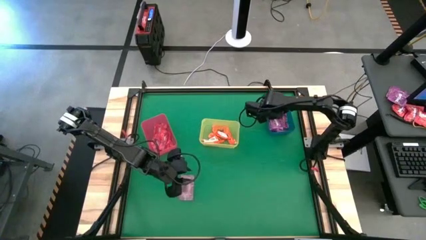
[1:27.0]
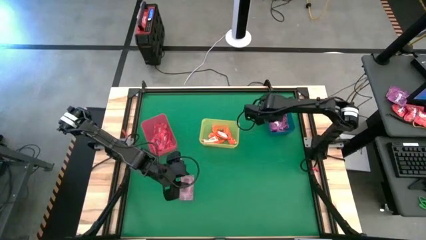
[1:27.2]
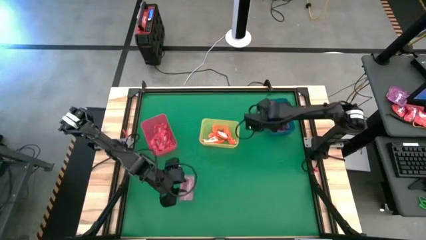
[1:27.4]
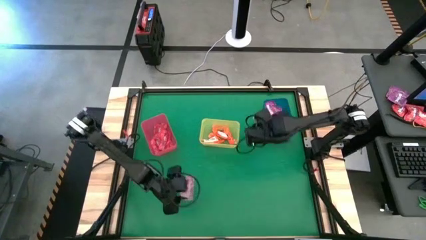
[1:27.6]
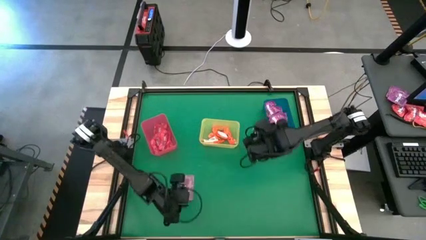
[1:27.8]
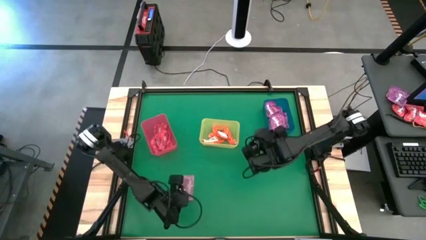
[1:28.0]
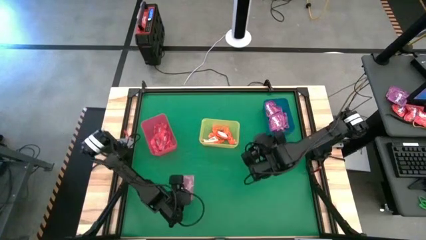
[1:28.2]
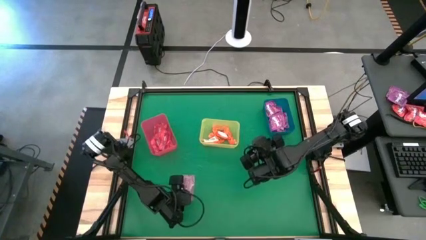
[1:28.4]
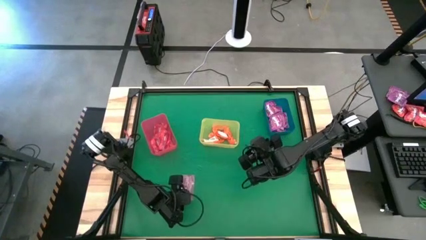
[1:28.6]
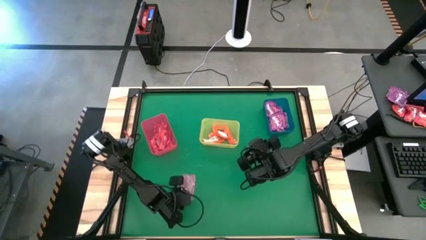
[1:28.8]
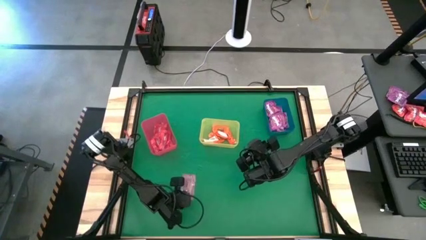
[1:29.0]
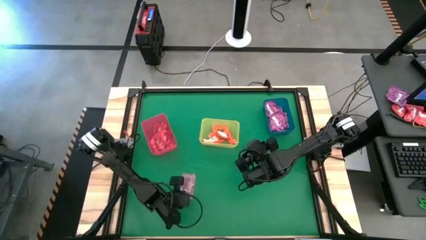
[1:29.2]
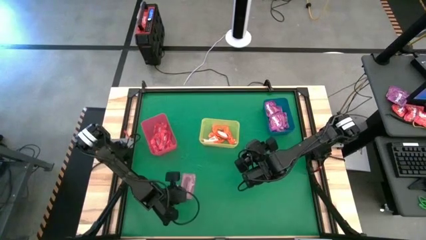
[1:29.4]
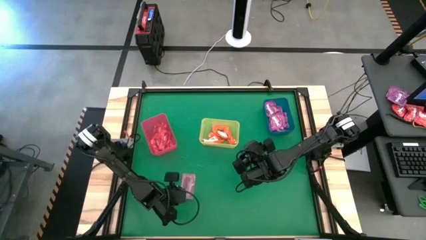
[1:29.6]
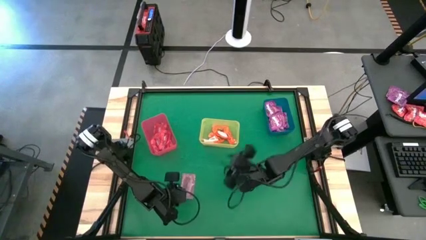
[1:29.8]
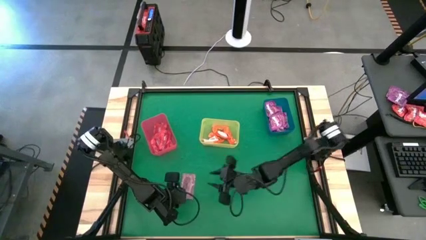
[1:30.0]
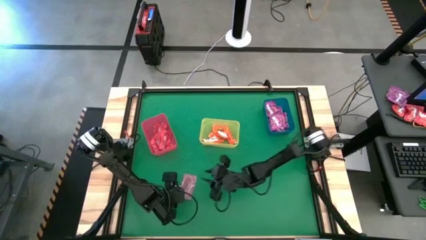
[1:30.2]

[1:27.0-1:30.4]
Task: Sort candy by brand, put in halloween buckets
Put the red candy into the red bin

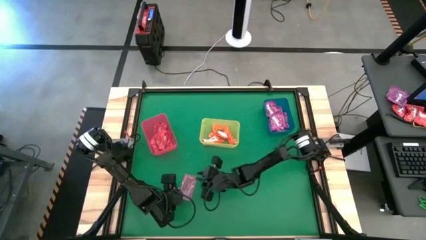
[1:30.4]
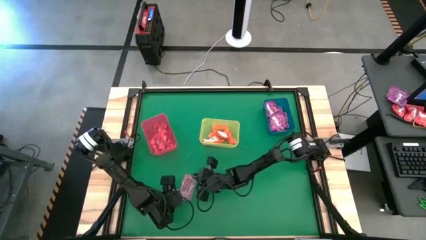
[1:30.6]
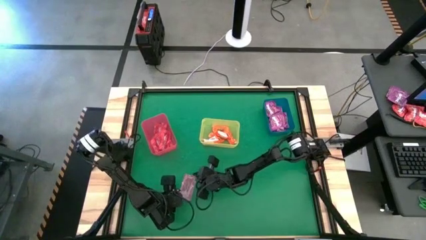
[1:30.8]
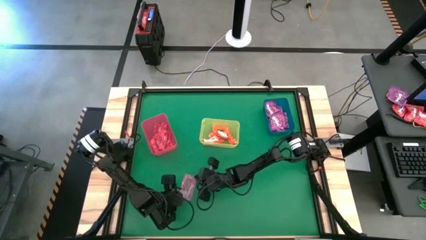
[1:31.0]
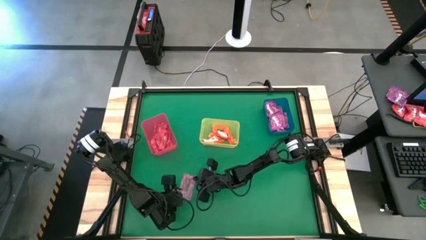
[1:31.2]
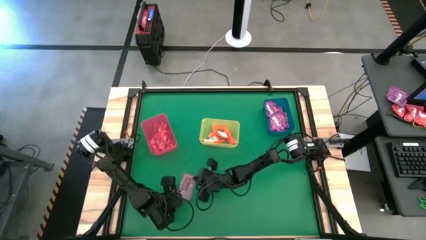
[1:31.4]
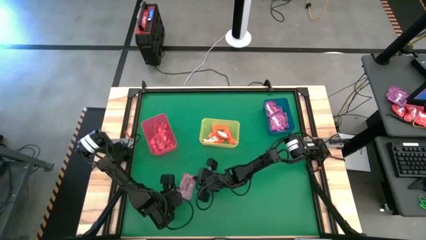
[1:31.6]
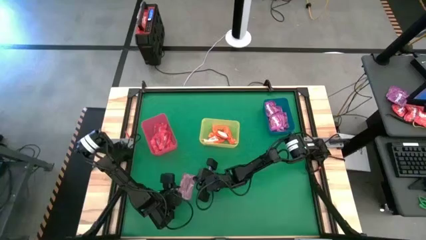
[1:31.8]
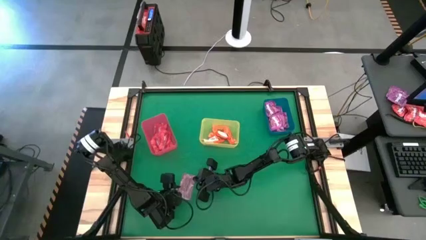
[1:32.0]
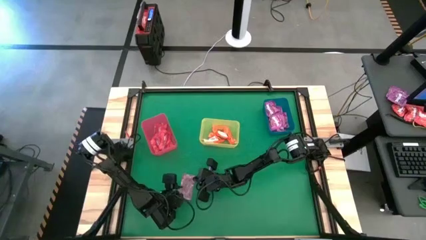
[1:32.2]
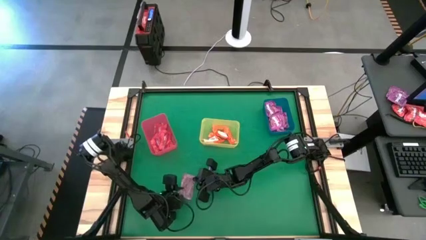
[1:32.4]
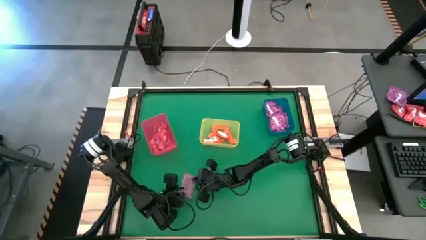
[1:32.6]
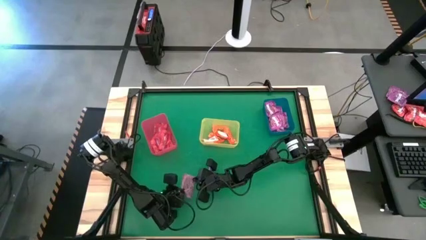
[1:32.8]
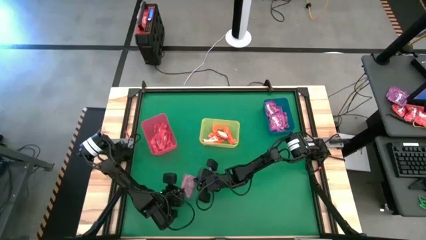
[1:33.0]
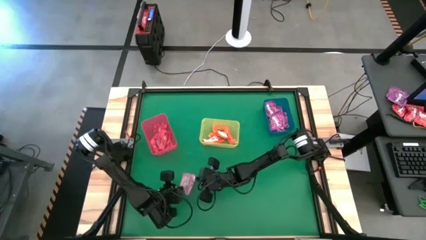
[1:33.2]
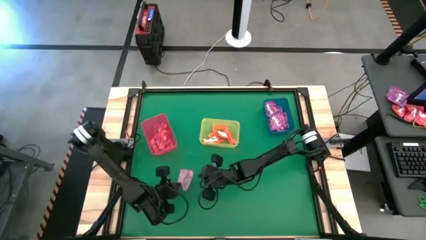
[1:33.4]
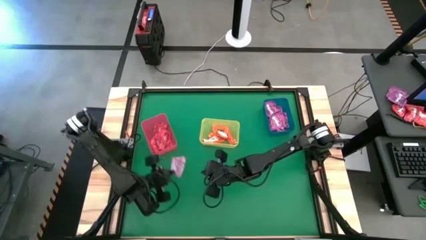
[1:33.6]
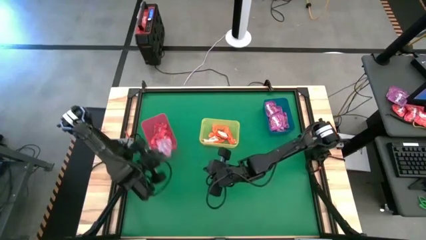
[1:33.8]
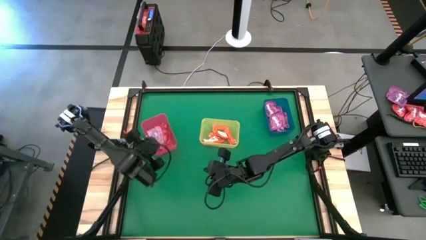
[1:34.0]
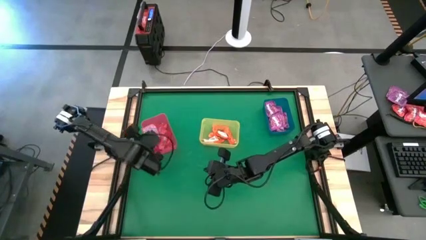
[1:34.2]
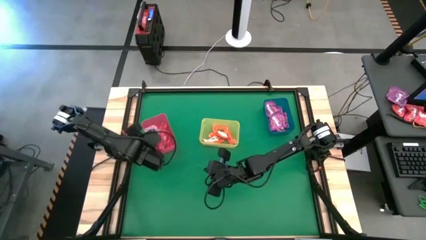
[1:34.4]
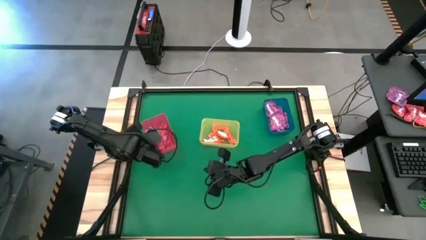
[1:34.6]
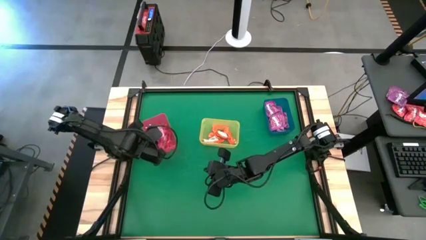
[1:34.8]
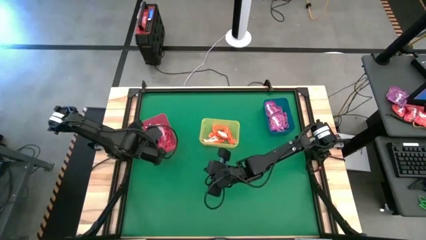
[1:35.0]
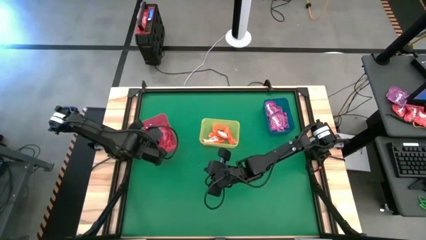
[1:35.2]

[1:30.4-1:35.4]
Put the red candy into the red bin

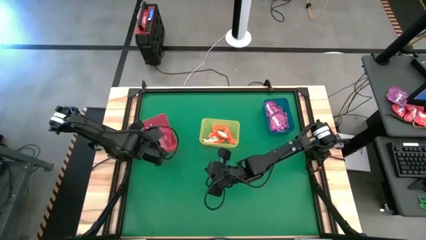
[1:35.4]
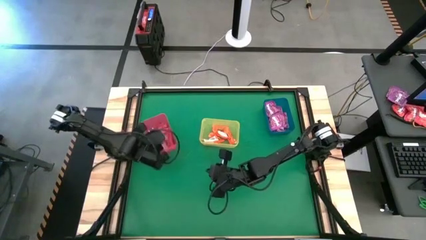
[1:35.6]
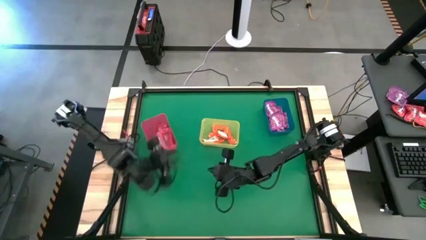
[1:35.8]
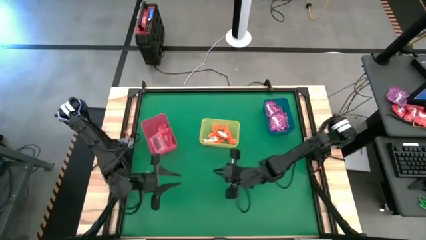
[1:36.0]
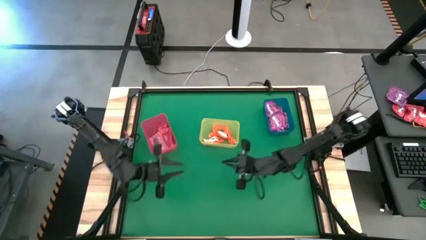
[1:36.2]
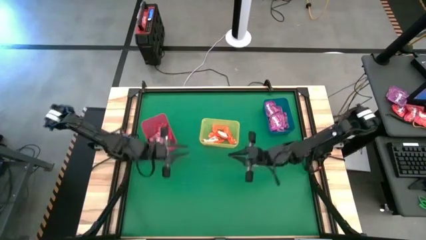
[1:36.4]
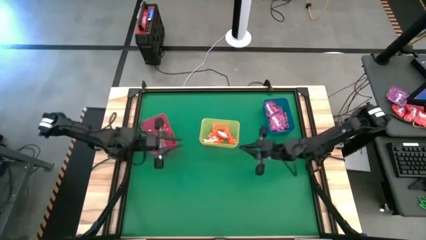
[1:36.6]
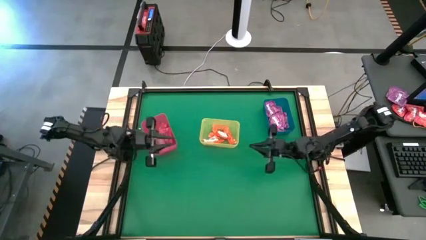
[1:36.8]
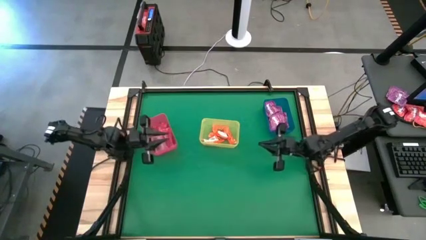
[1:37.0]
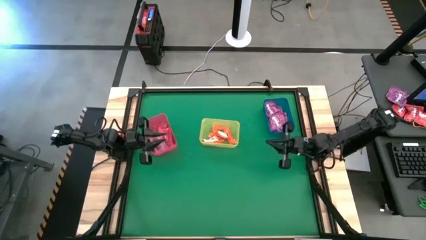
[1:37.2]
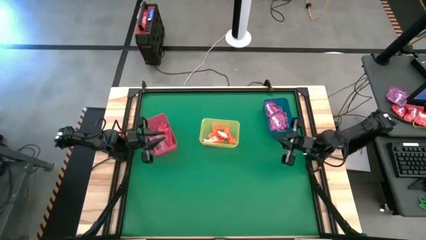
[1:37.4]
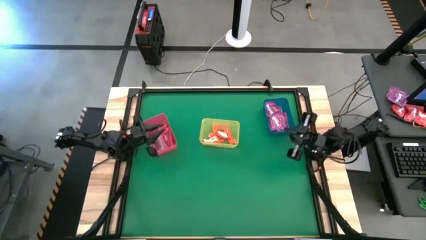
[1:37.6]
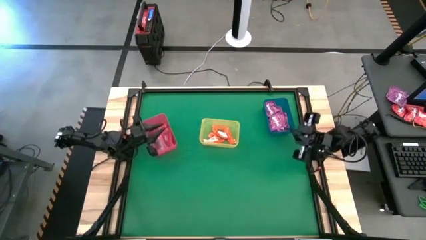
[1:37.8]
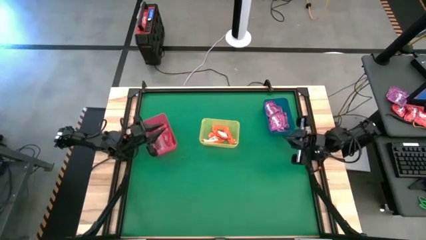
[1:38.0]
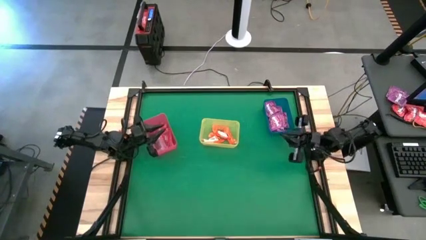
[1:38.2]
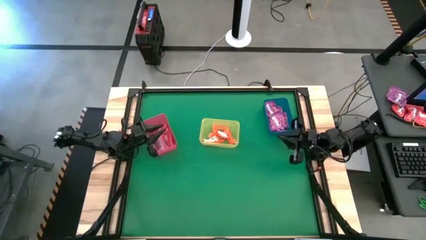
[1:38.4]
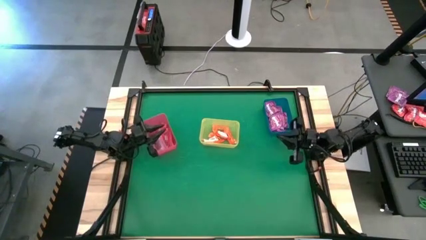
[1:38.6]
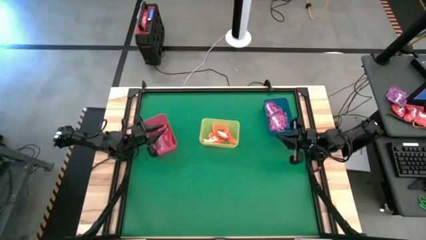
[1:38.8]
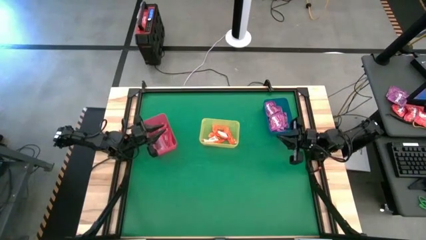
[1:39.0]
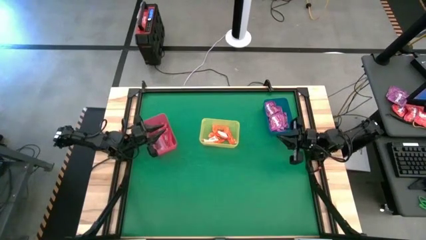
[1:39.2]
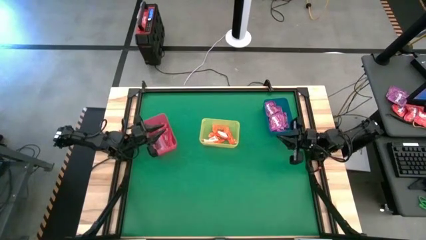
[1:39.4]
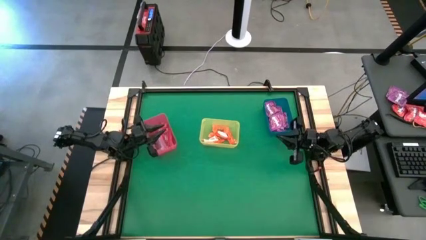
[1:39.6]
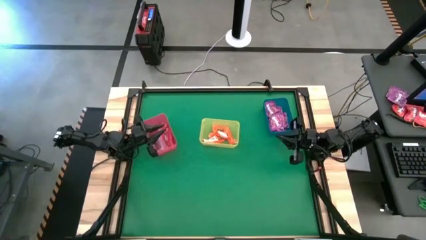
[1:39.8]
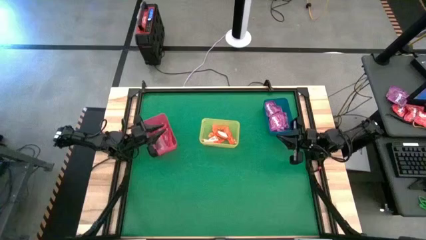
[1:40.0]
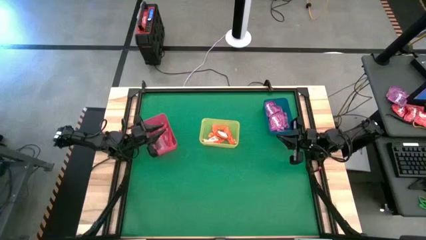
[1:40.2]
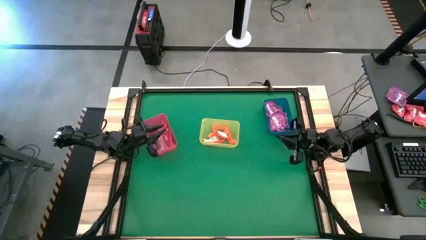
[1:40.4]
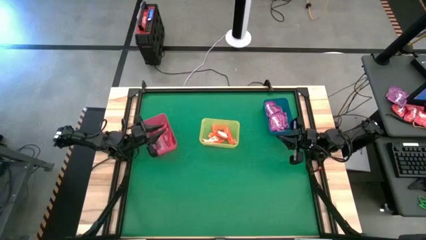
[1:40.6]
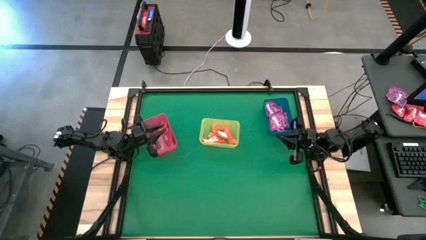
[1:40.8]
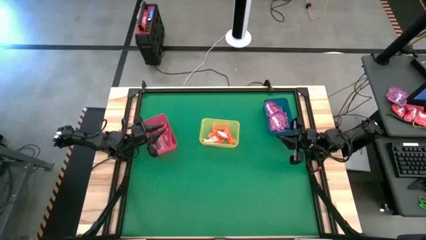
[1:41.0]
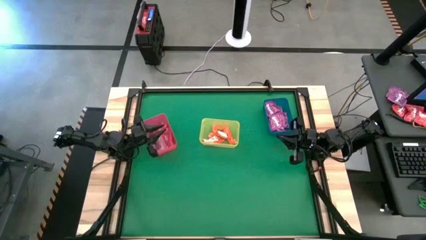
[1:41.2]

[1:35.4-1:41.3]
Return to Home Position
